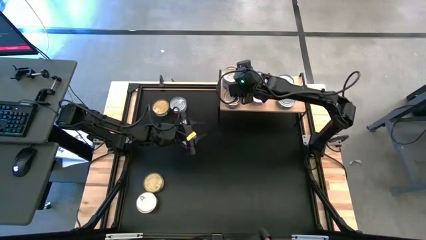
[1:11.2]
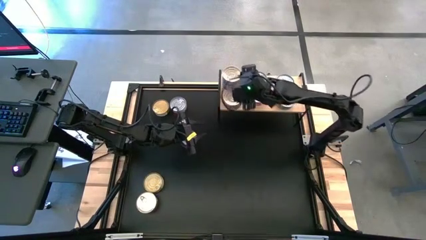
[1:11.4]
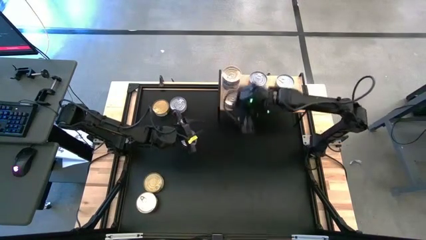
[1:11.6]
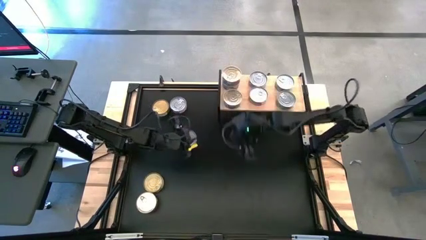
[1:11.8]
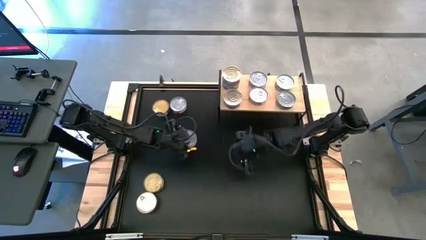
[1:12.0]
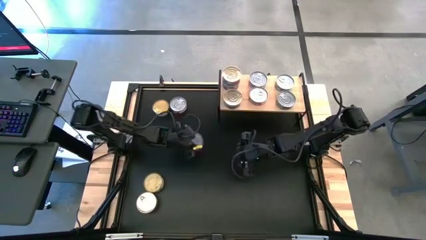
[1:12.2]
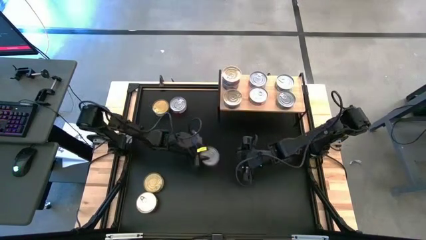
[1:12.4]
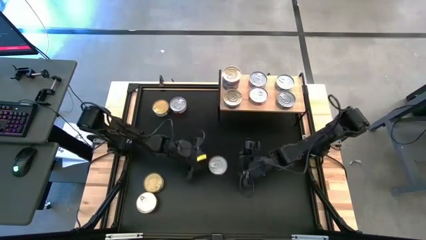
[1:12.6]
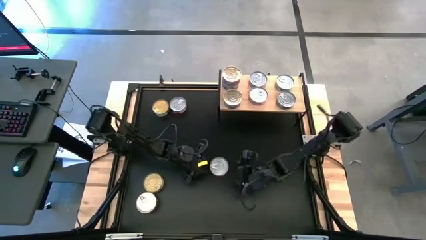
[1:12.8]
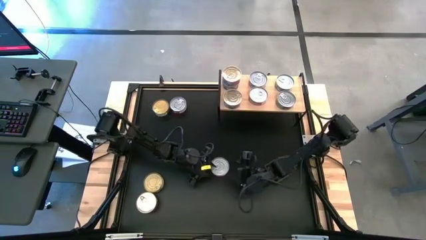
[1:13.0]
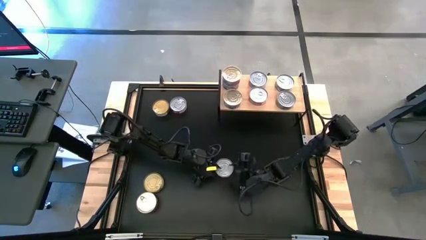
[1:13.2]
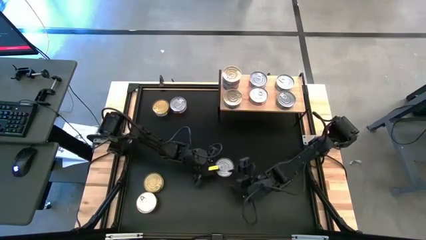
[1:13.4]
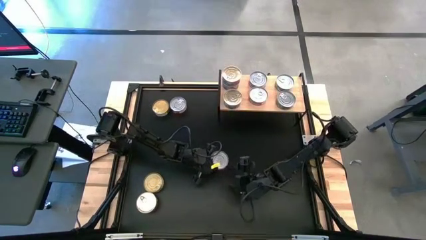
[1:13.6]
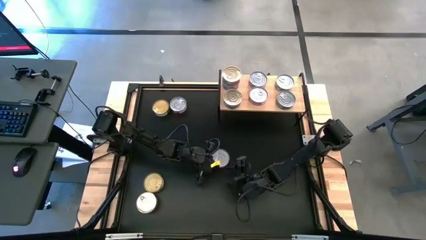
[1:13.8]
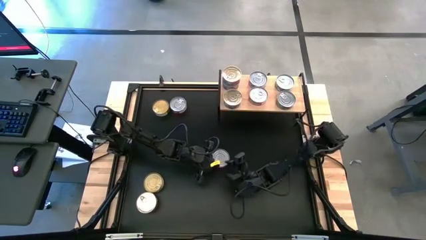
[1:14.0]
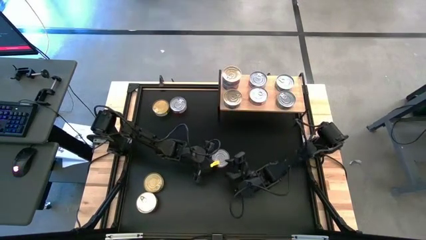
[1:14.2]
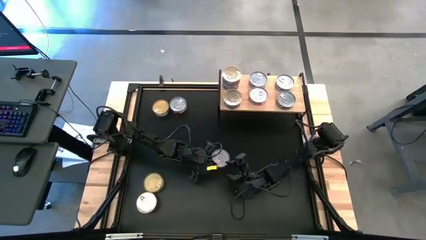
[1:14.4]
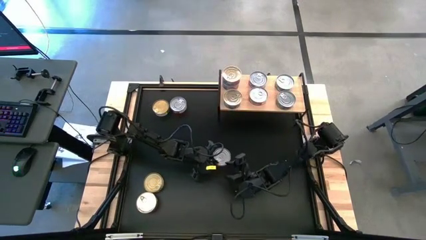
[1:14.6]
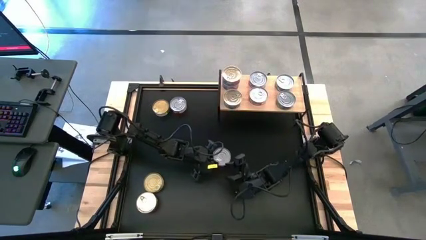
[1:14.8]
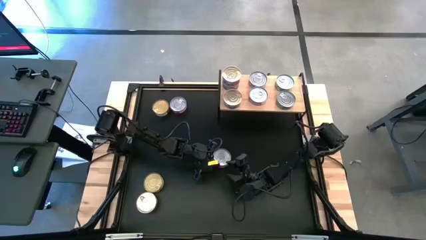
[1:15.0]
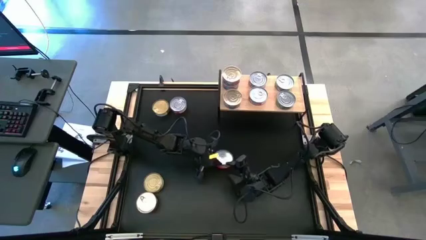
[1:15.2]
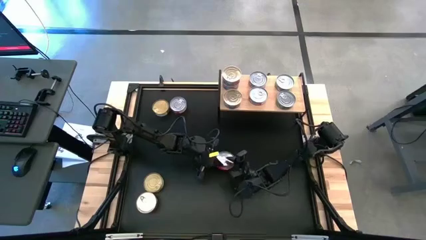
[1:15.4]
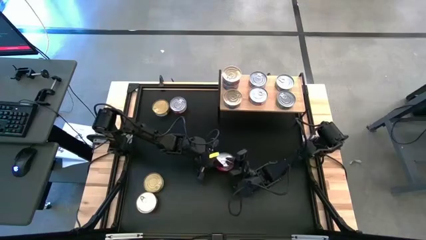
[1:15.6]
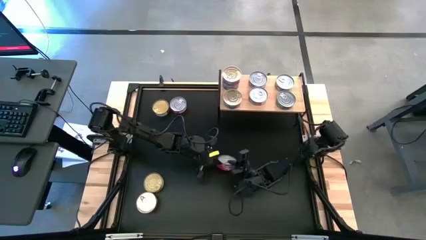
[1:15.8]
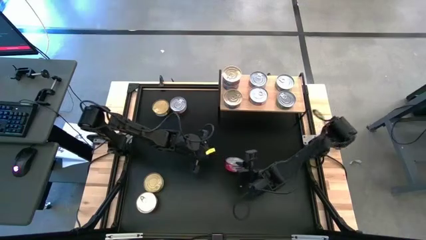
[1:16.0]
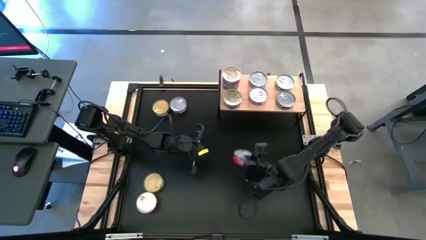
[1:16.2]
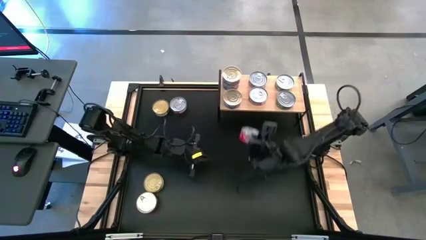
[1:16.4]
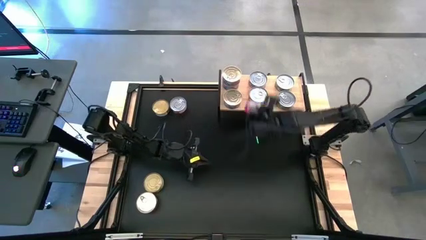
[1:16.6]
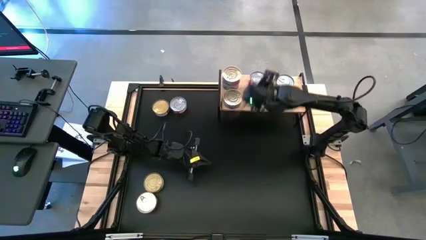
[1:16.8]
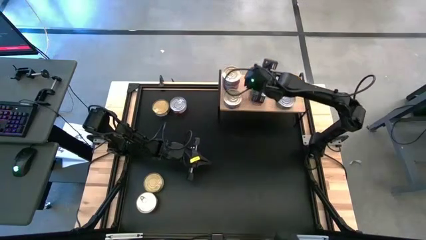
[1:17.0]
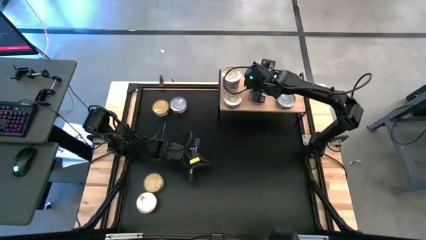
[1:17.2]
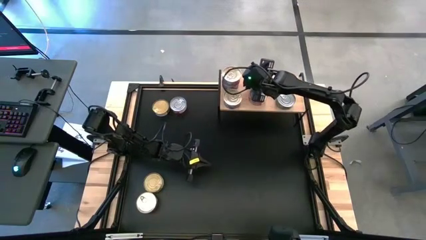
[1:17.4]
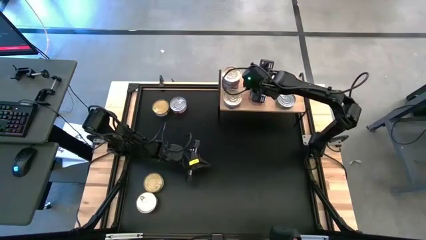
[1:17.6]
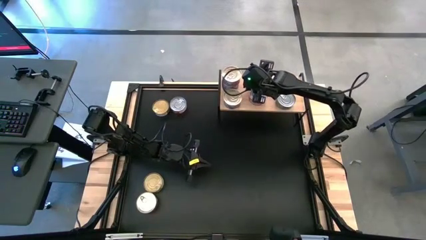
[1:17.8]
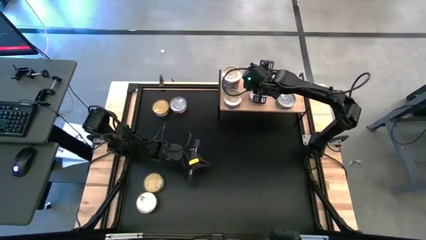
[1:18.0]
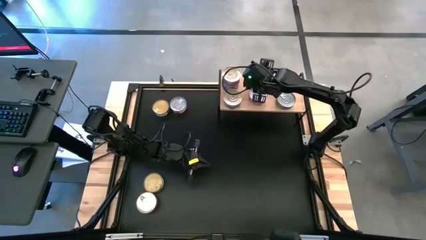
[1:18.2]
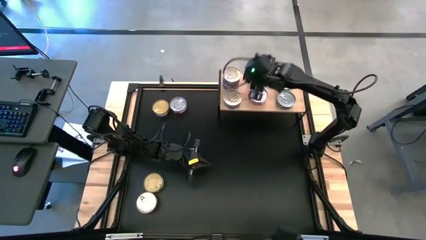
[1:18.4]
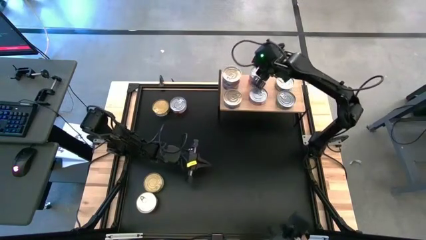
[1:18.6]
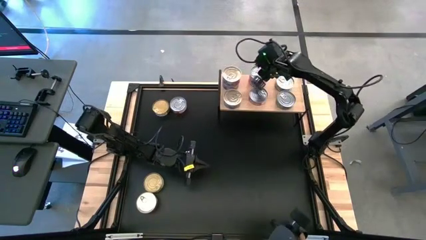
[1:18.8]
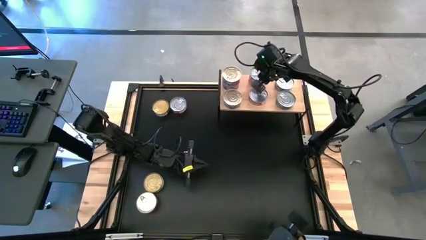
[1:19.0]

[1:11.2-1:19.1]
Task: Stack canned seafood by type on shelf
Stack the red tuna can on top of the other red tuna can on the shelf

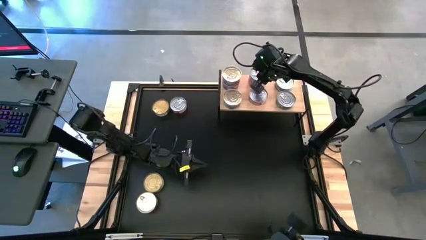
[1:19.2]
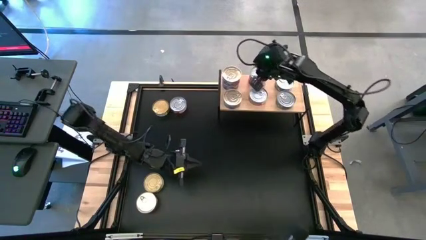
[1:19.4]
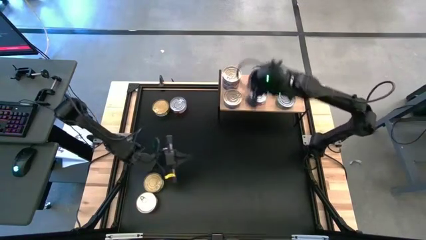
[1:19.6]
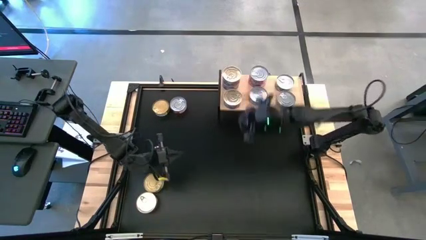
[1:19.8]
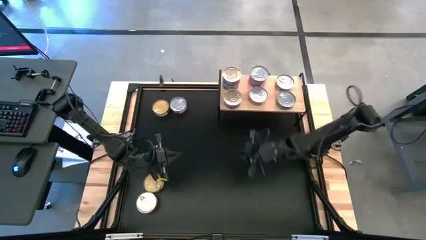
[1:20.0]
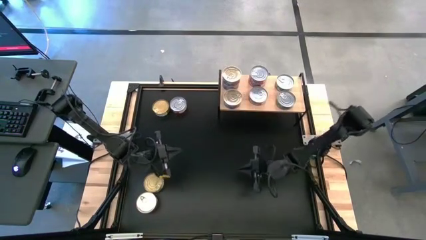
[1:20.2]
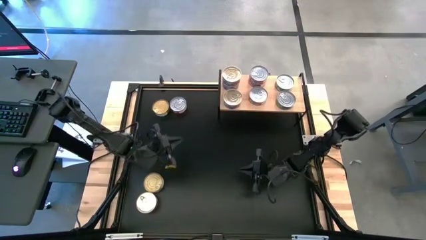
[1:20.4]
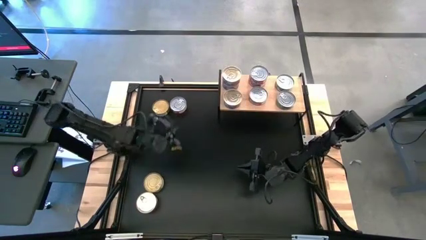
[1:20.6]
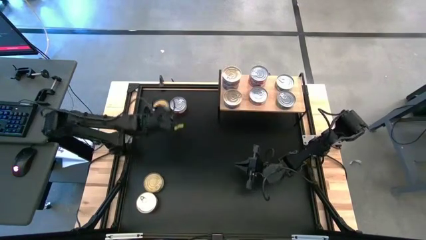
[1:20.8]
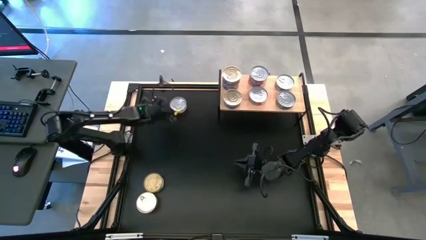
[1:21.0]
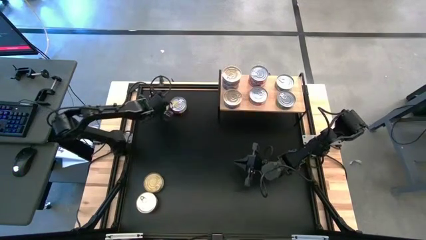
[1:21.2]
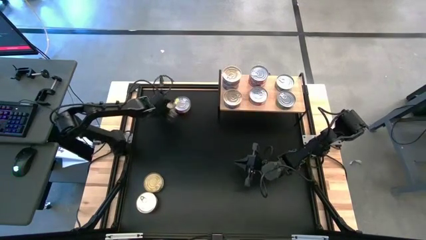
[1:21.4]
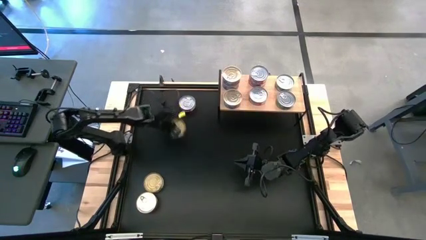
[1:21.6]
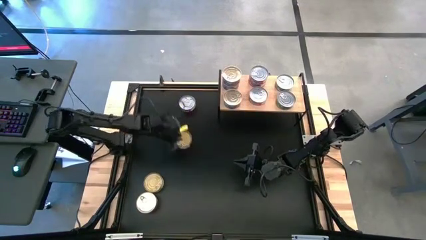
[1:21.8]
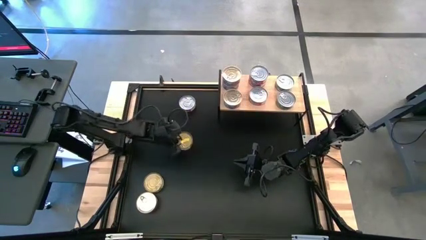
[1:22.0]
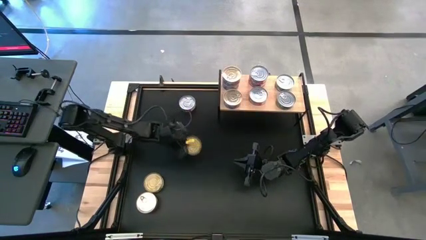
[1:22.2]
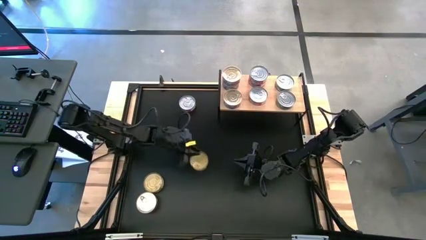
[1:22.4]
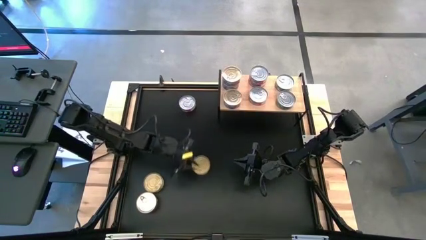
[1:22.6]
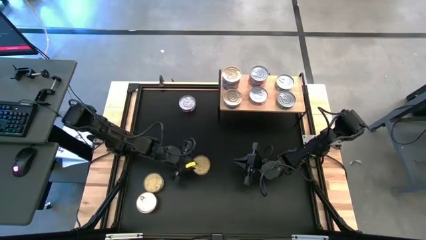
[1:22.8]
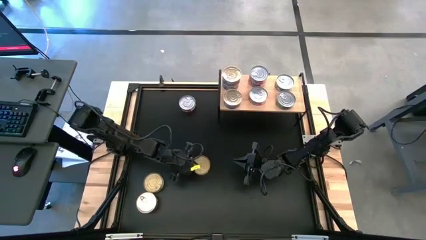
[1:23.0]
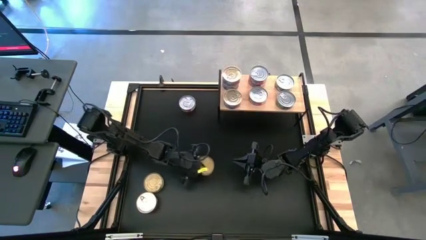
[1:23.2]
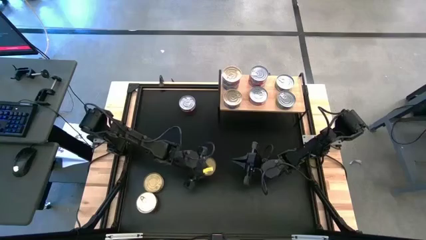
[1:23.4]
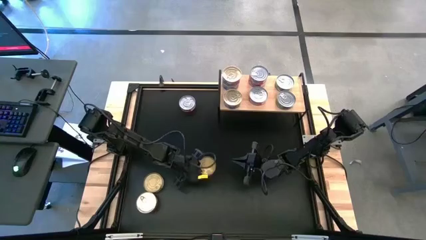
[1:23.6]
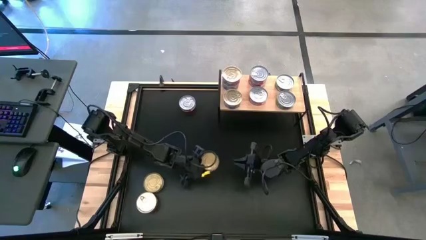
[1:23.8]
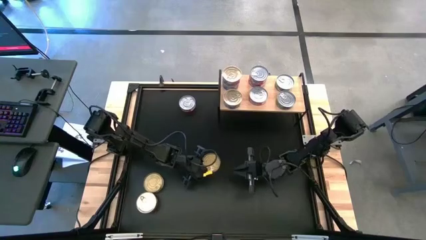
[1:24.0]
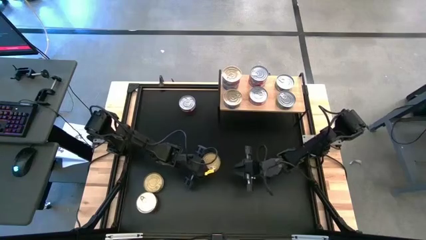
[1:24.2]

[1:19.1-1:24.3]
Stack the green tuna can on top of the other green tuna can on the shelf

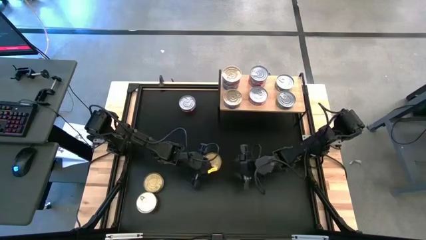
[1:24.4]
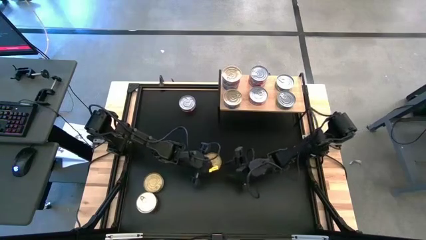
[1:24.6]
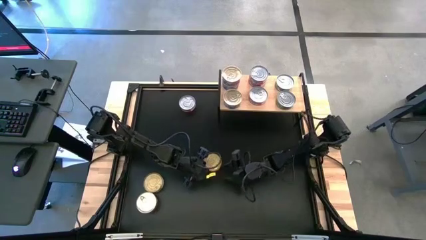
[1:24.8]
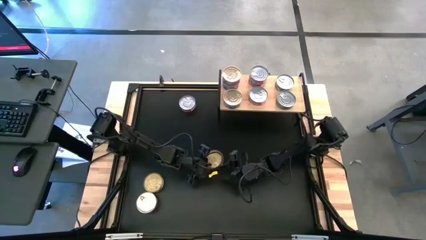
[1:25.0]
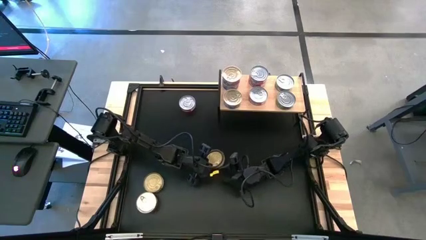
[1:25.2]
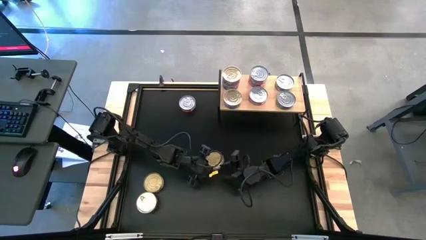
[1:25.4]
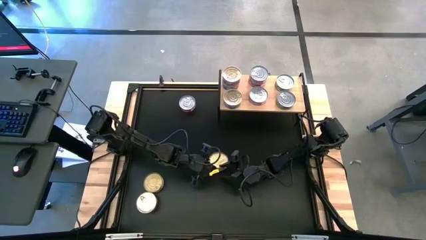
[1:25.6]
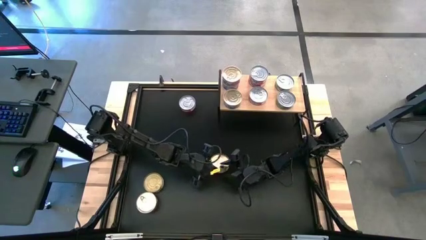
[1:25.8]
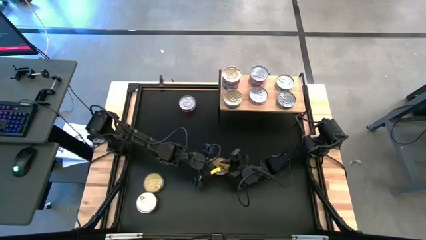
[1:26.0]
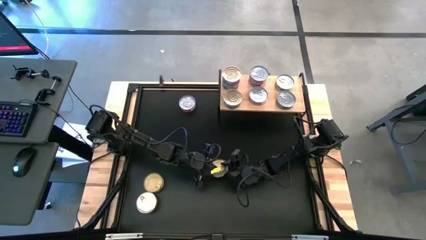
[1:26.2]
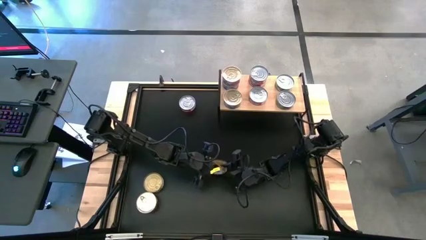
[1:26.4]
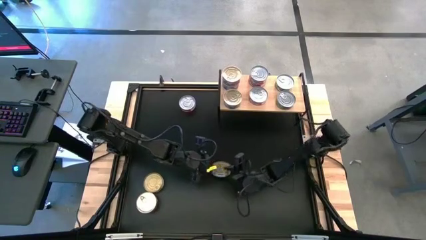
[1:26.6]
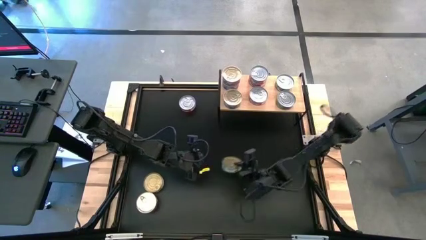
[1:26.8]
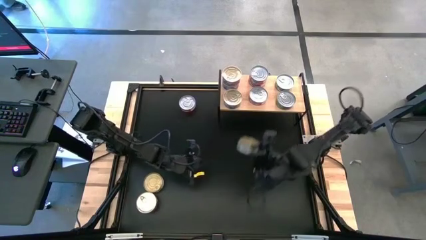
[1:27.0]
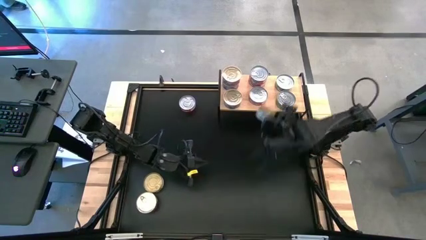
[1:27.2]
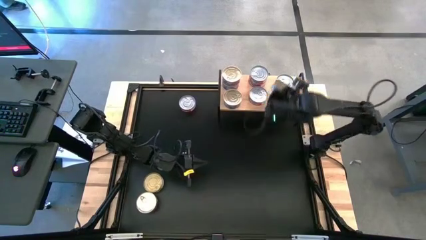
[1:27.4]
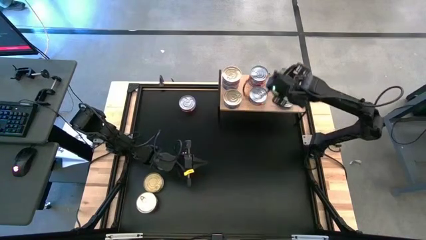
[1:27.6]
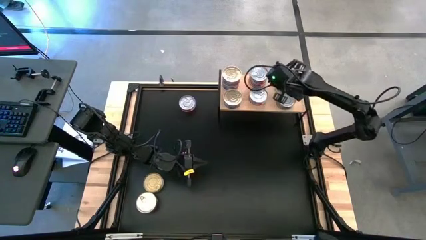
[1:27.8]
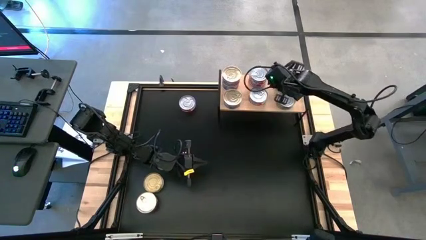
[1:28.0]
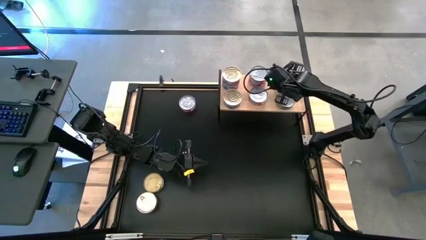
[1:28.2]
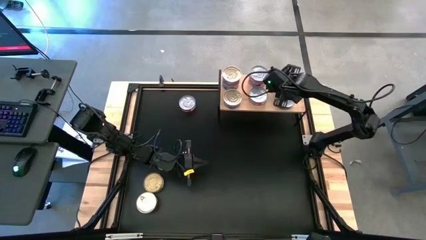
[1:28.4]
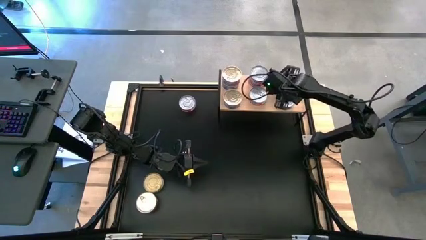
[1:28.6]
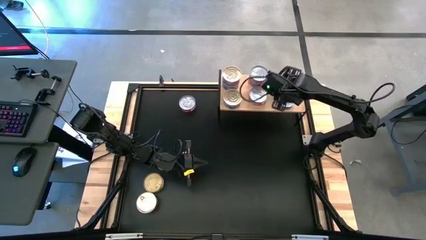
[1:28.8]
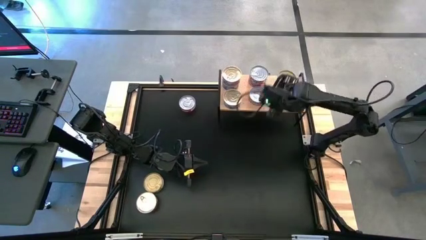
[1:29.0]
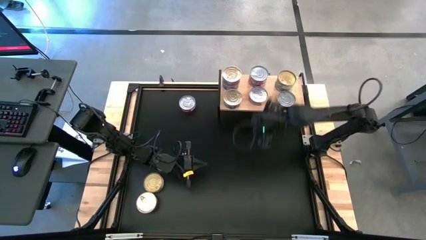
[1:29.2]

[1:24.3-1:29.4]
Stack the green tuna can on top of the other green tuna can on the shelf
